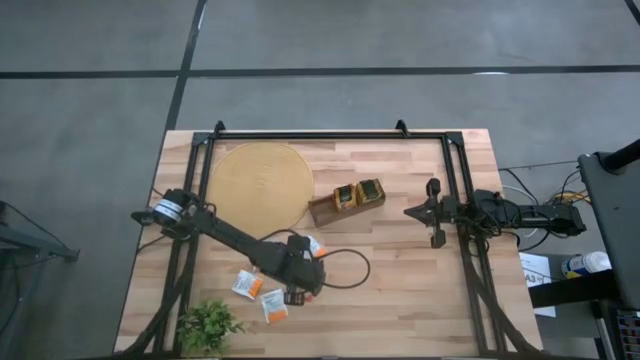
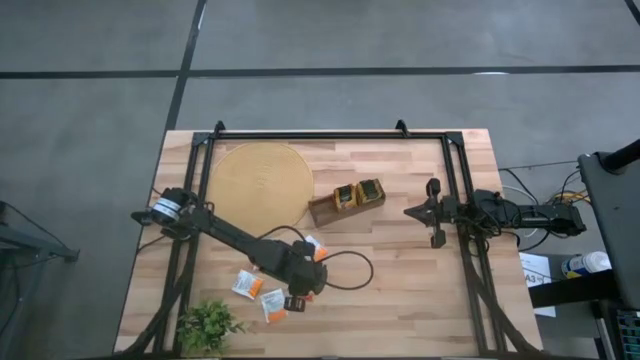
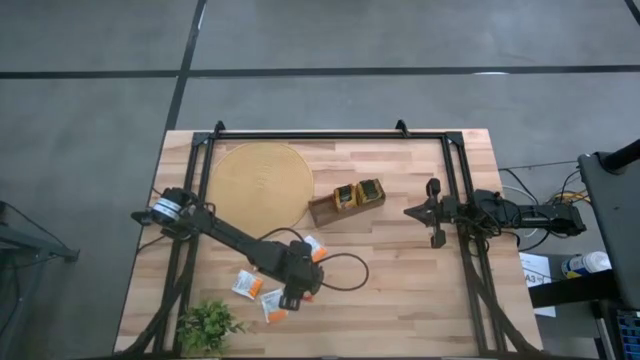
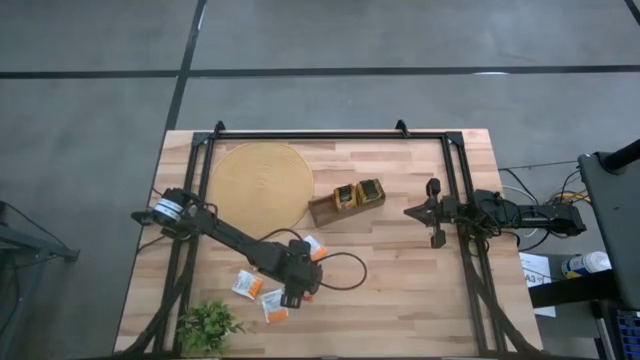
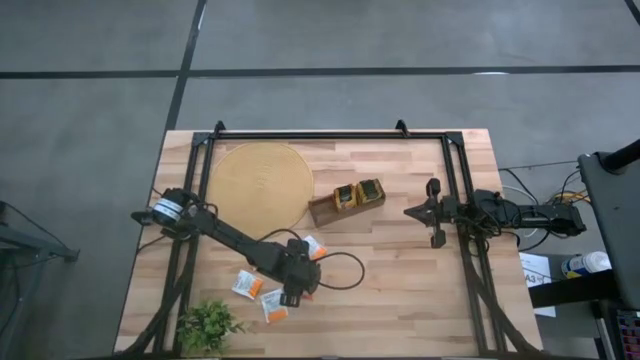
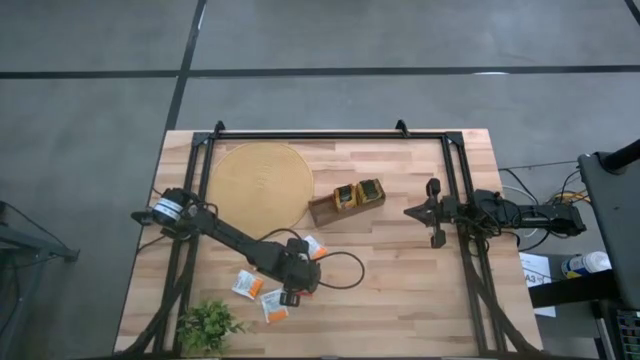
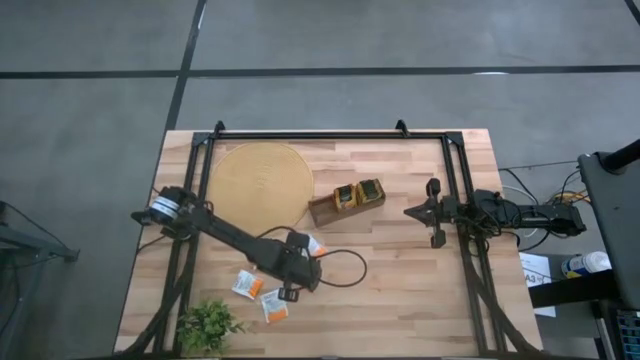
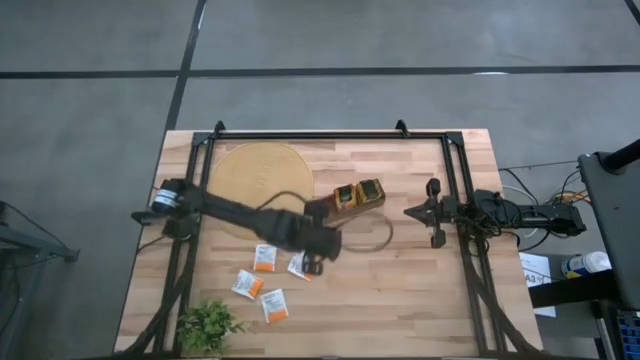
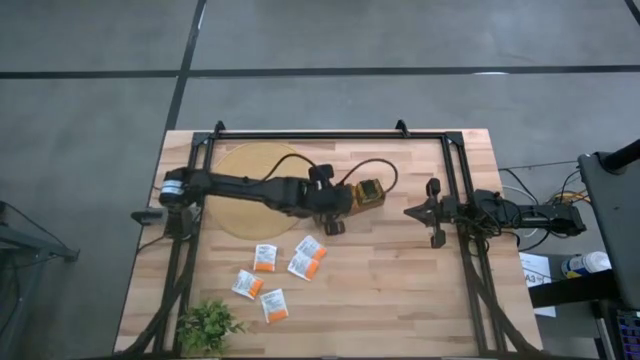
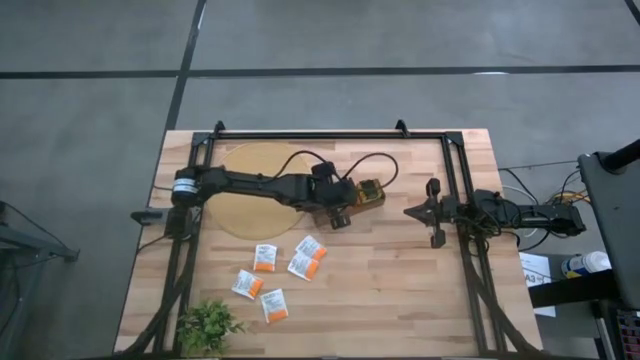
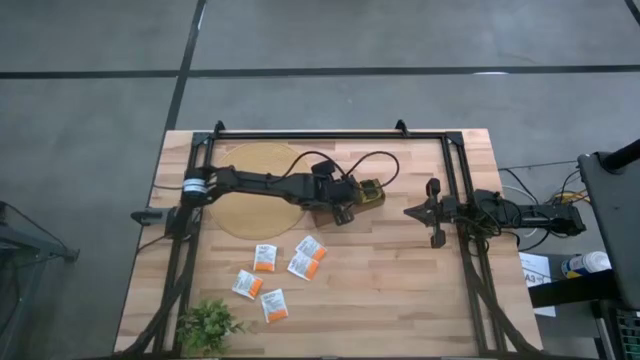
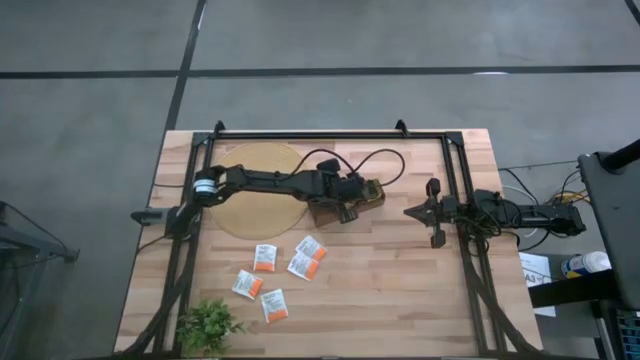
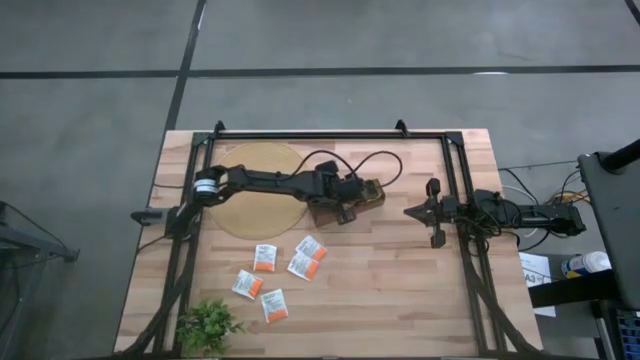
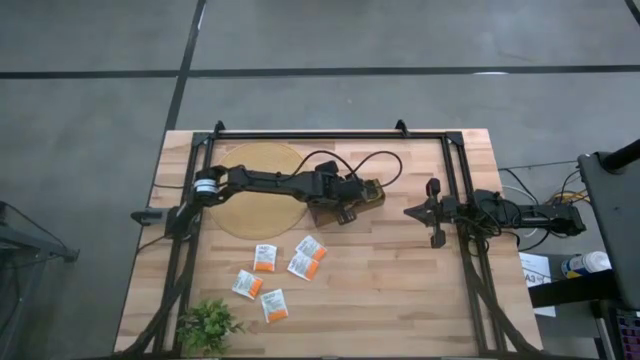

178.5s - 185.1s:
Task: Pick & Place Tea
Put the orange tea bag into the middle section of the wooden organizer

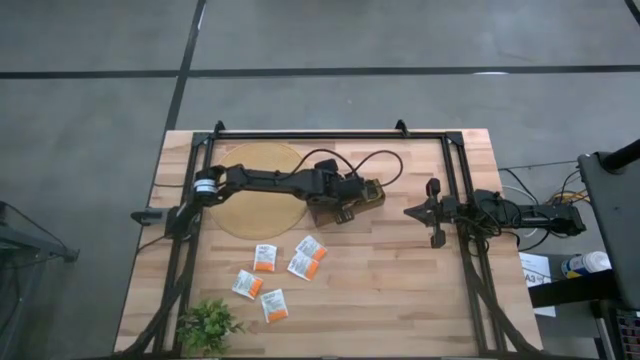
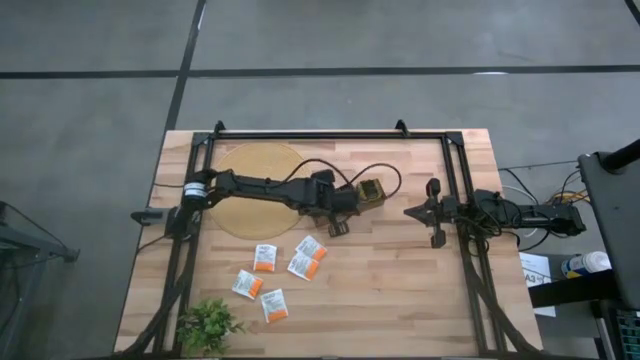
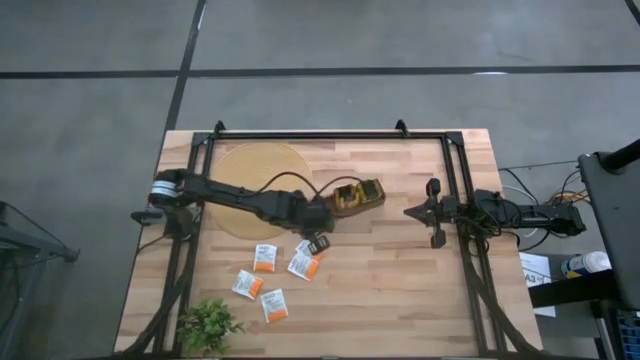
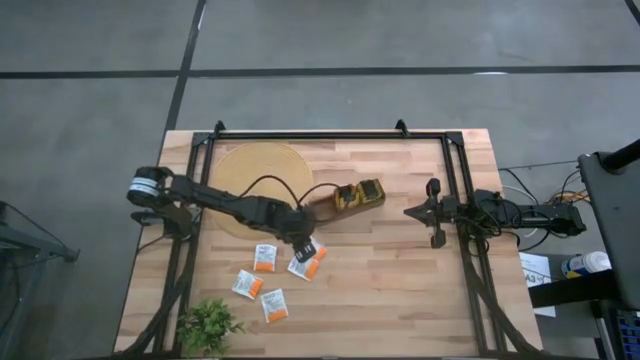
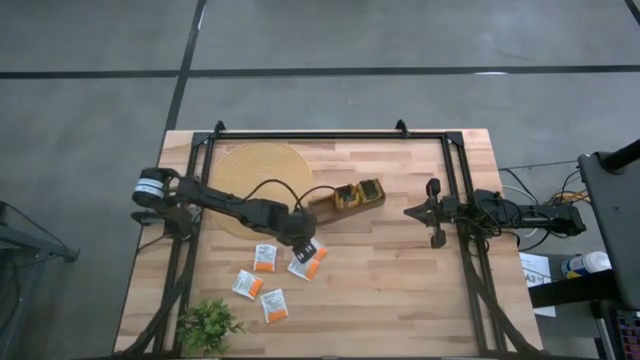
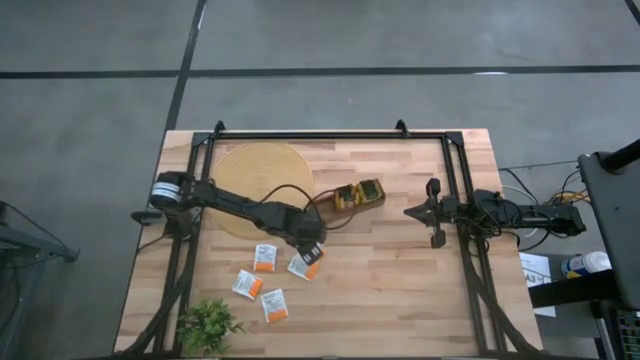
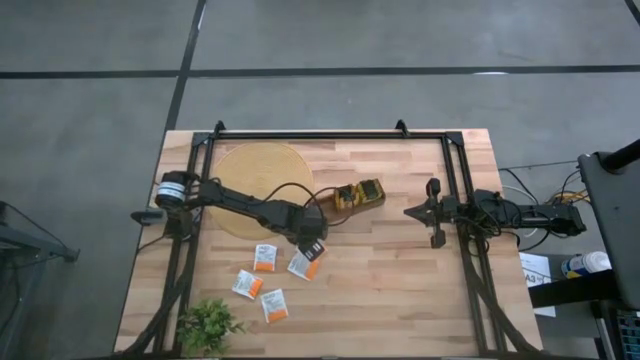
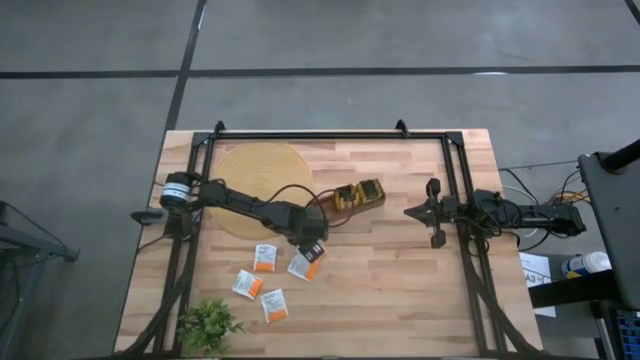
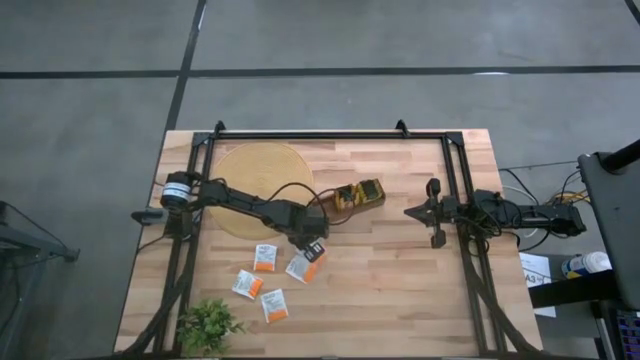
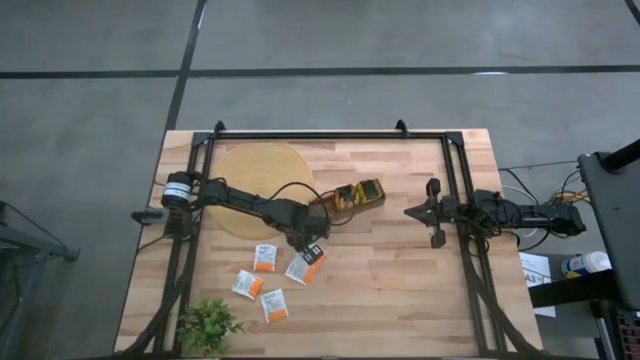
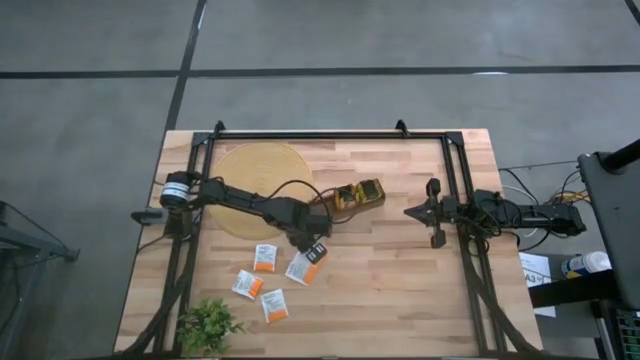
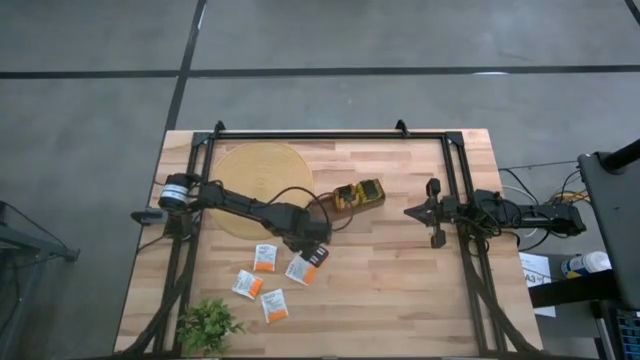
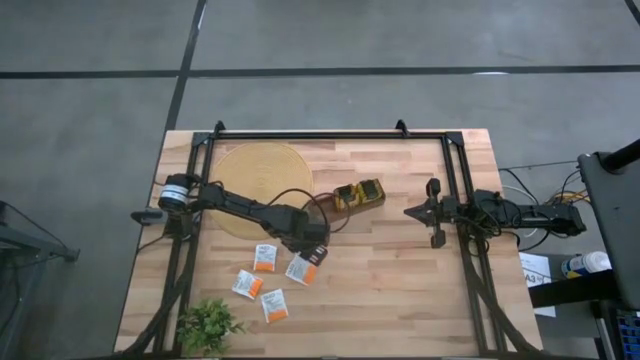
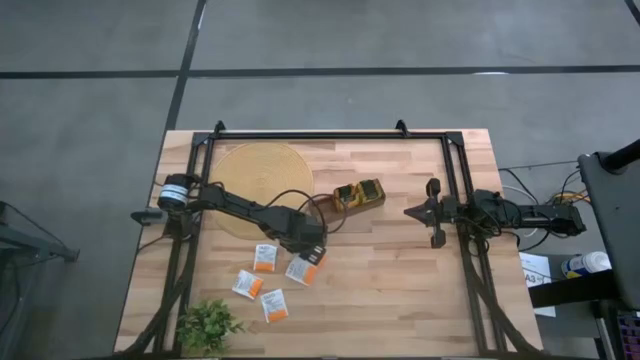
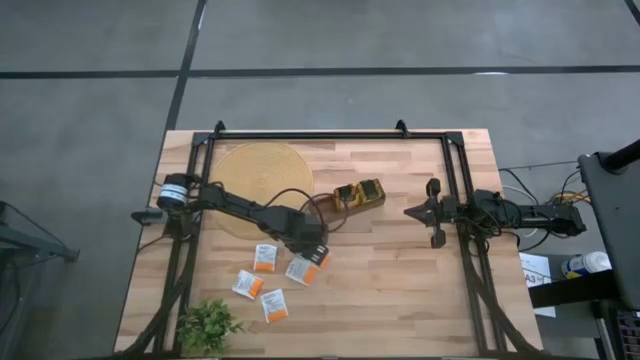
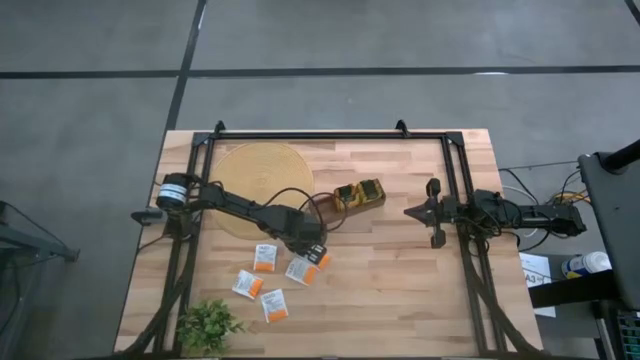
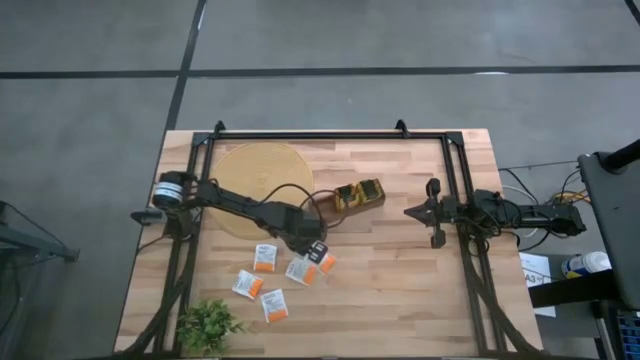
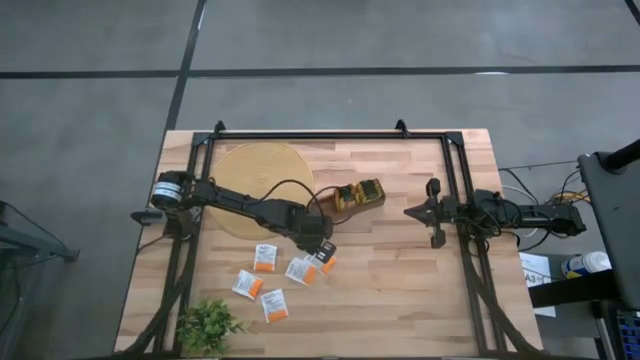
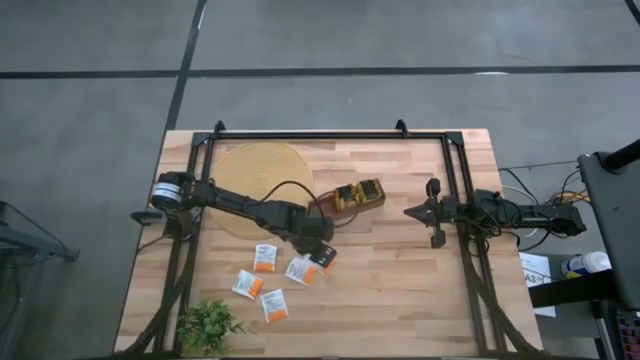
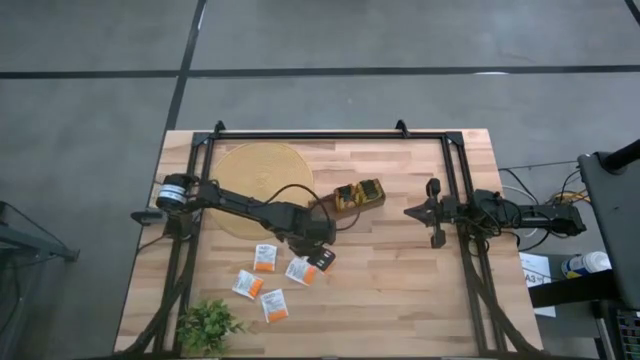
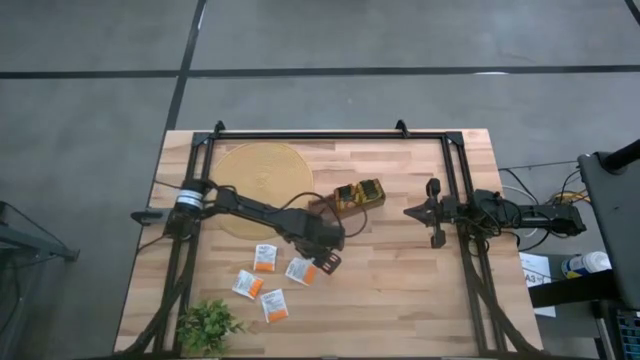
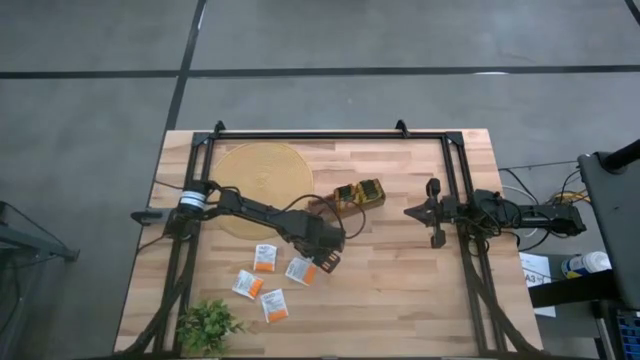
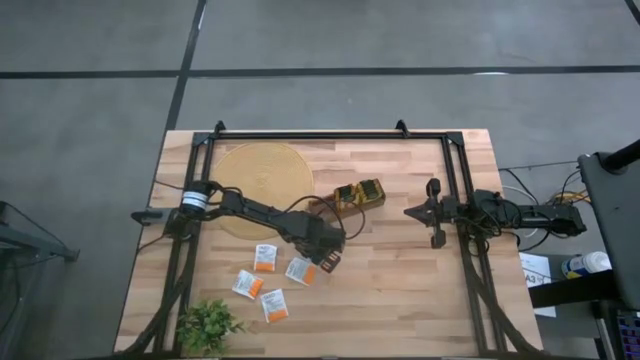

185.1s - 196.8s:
Put the white tea bag into the left section of the wooden organizer
